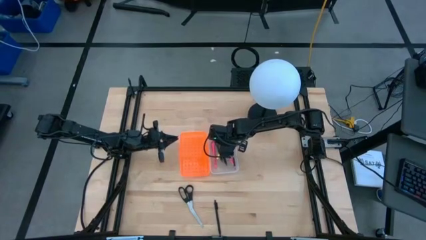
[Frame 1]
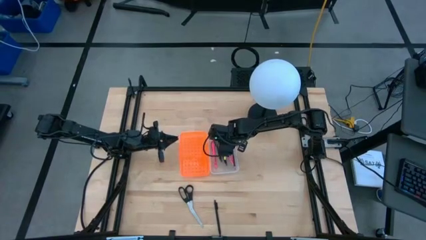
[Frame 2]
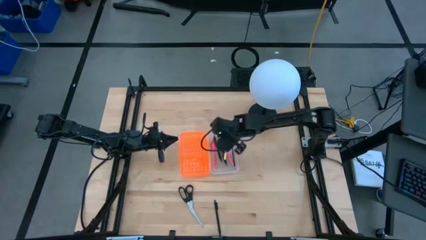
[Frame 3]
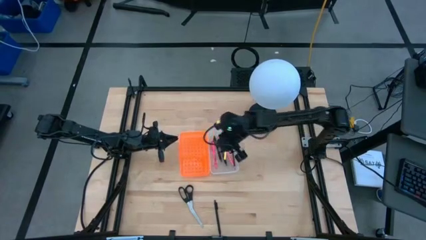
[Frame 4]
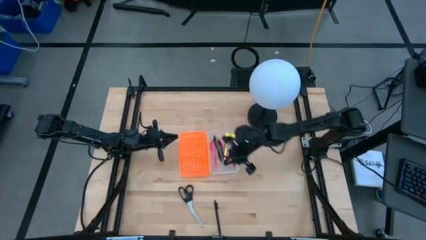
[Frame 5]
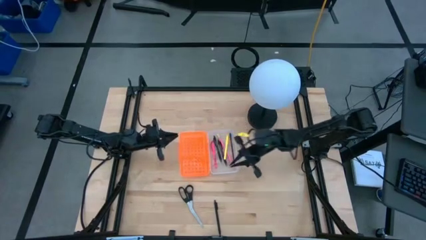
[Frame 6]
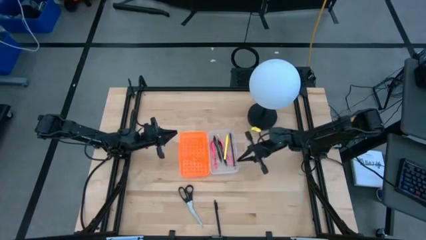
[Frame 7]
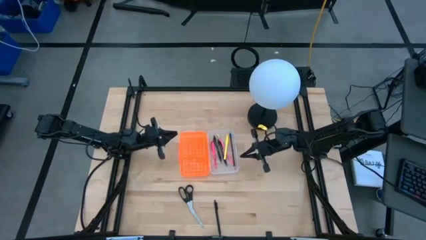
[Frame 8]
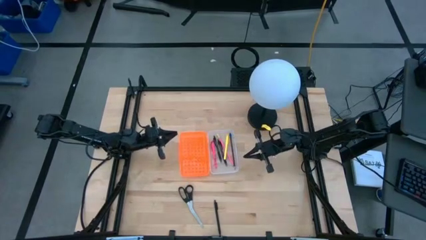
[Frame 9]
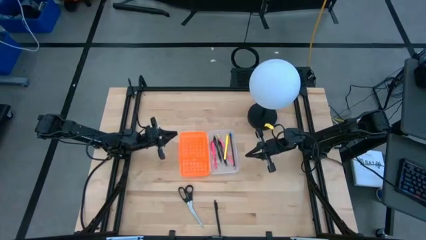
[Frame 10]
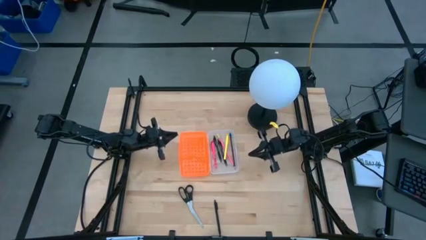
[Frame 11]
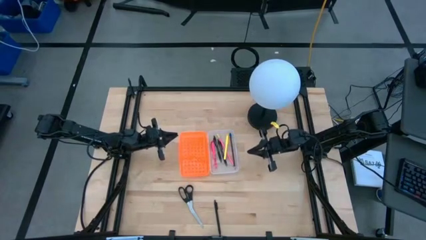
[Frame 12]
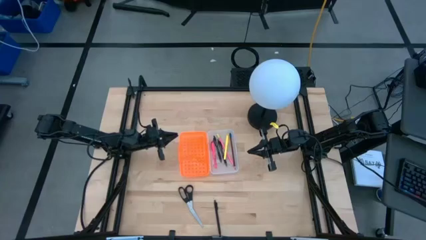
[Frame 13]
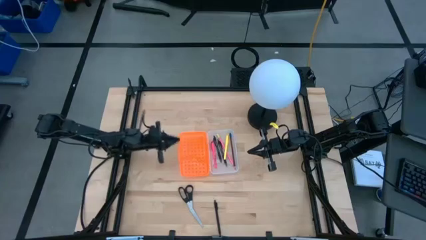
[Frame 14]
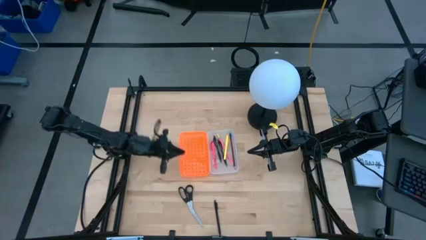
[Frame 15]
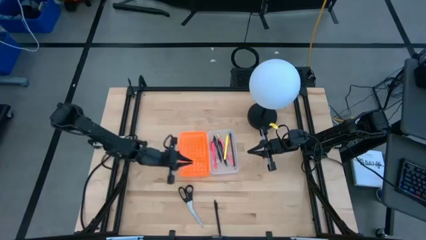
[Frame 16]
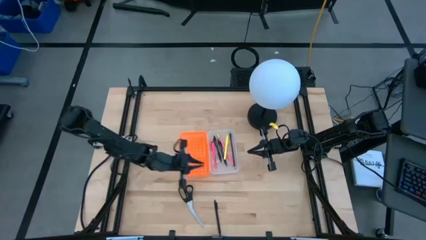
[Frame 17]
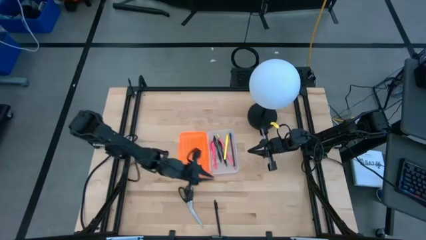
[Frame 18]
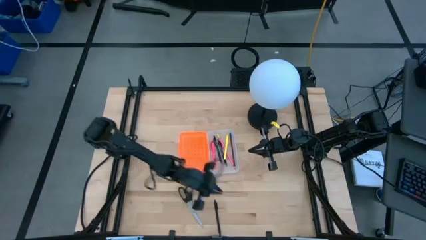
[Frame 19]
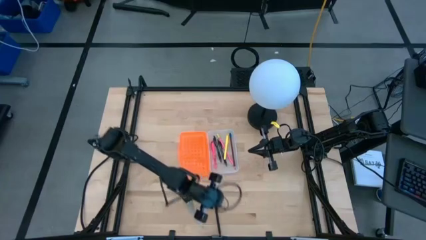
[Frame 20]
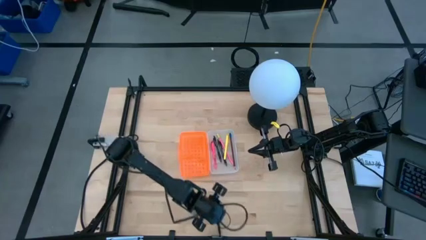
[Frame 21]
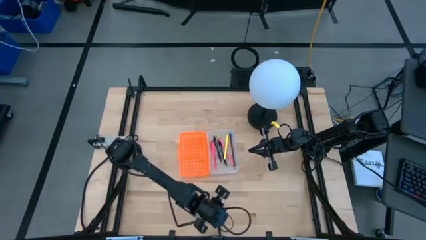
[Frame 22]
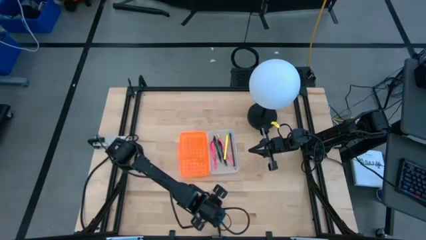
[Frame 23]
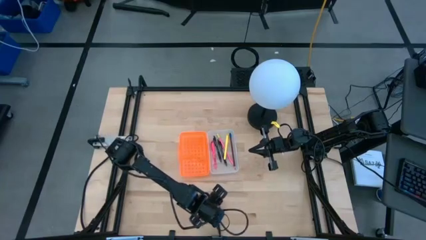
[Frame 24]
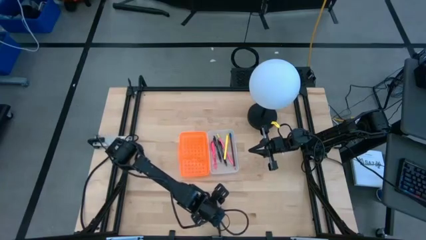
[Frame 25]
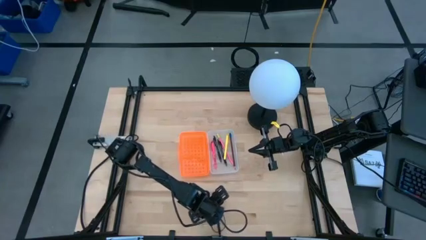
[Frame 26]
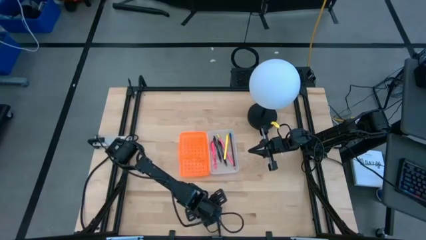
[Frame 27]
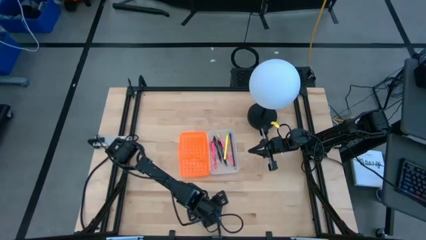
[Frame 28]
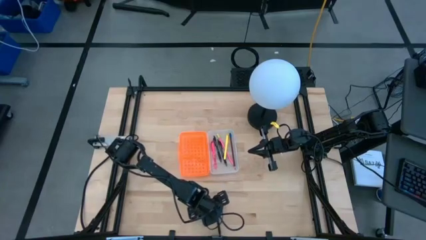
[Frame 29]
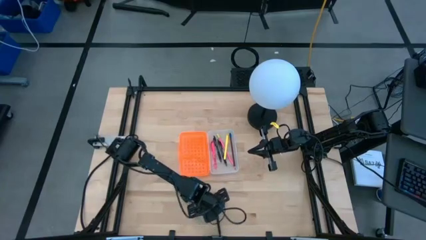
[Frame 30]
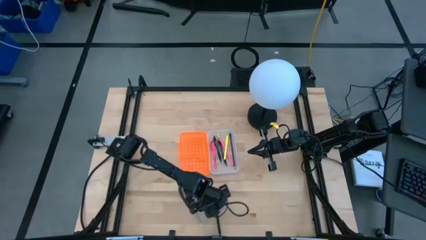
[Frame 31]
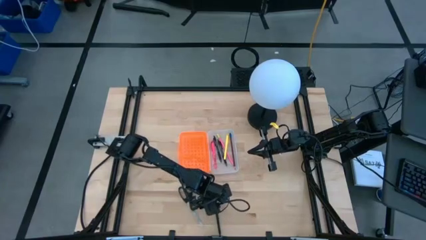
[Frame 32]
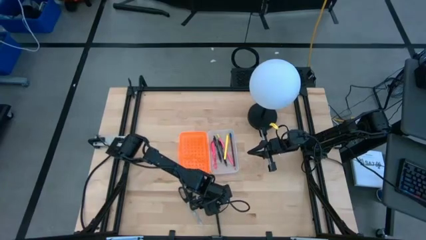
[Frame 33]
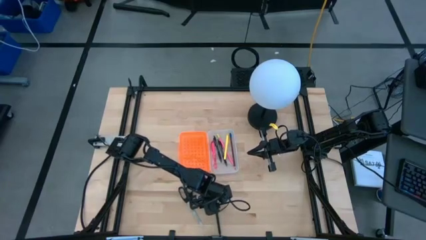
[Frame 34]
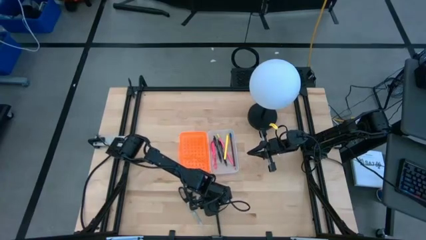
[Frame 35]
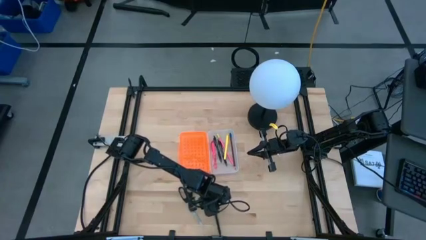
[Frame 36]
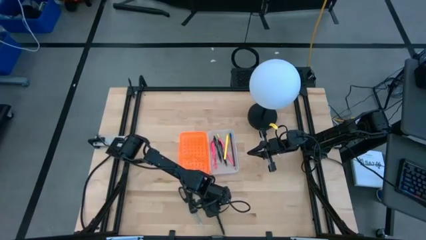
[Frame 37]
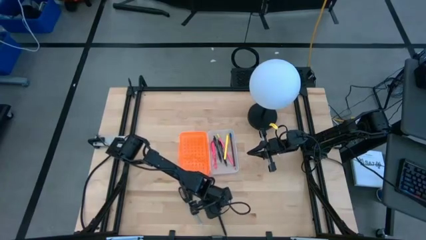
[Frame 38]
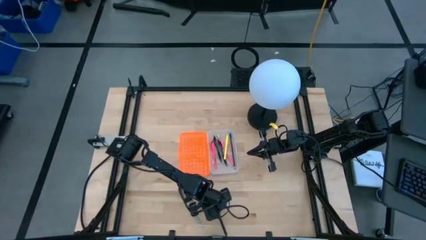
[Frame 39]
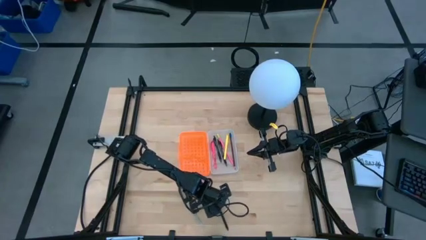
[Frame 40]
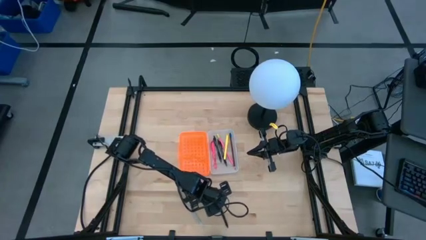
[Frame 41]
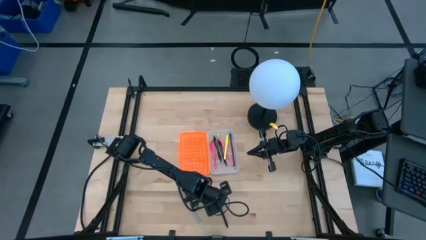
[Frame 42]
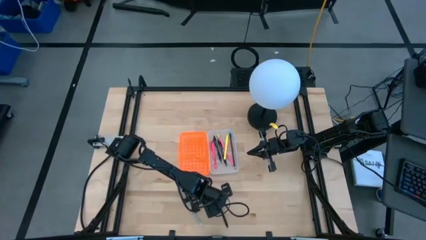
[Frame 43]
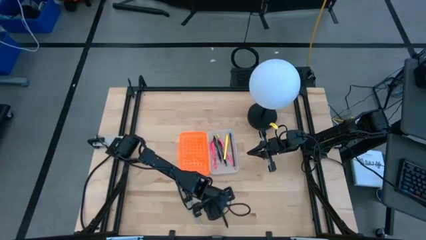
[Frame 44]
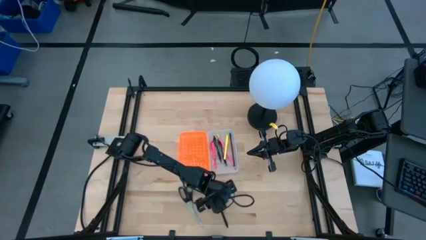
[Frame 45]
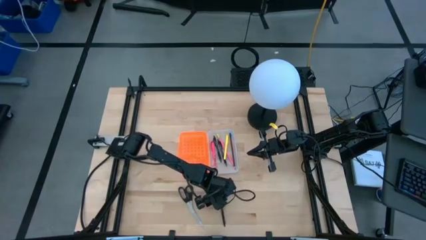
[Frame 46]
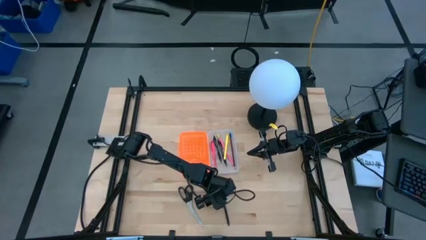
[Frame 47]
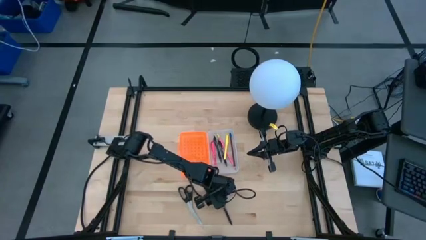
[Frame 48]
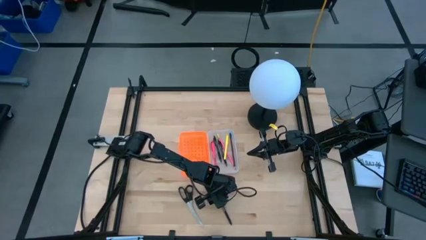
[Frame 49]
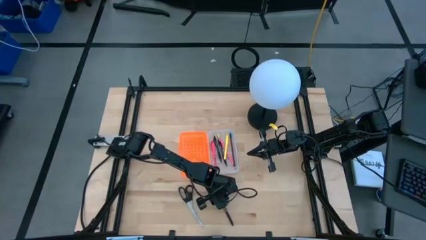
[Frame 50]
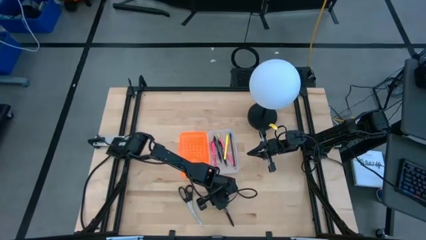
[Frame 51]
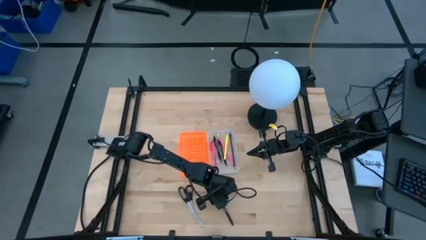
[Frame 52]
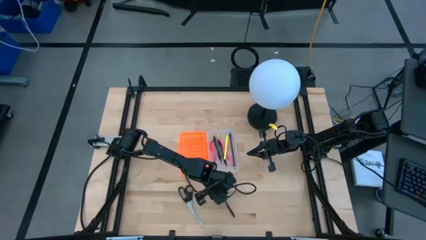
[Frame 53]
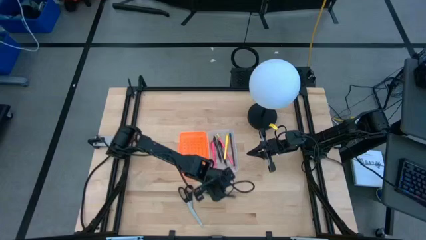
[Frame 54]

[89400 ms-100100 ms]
Task: Pick & place school supplies into a supply box
Put the black pen into the supply box

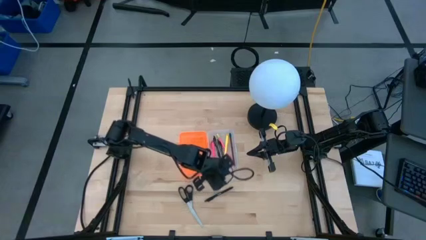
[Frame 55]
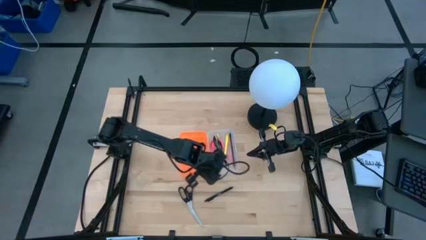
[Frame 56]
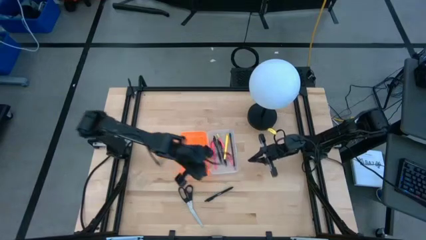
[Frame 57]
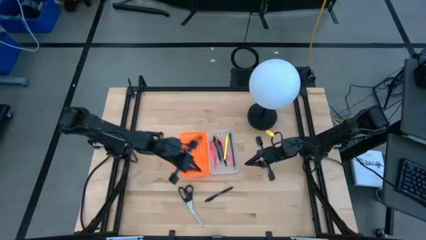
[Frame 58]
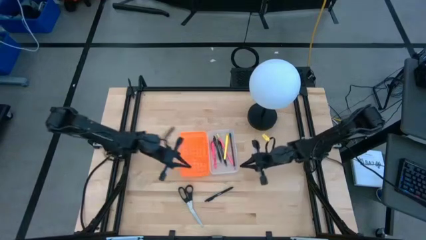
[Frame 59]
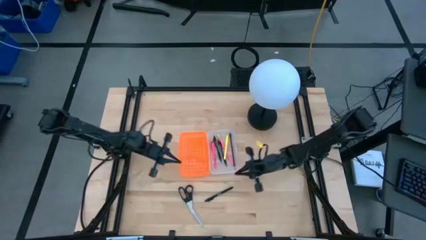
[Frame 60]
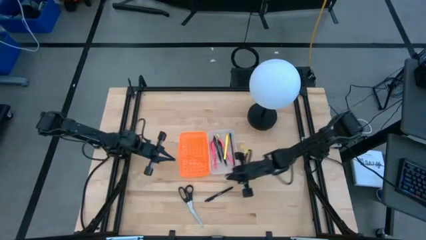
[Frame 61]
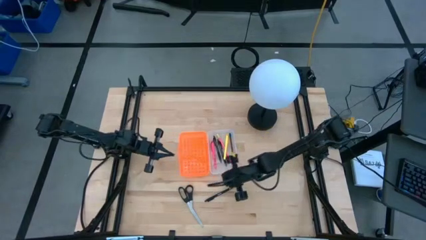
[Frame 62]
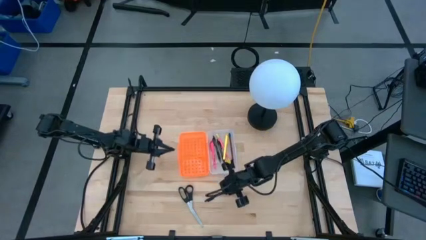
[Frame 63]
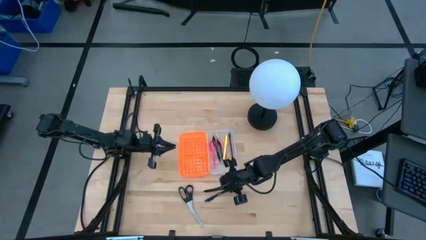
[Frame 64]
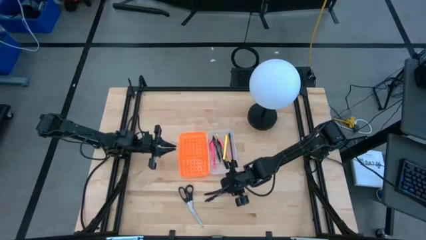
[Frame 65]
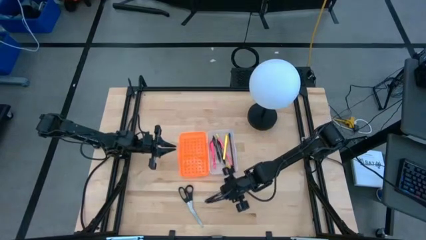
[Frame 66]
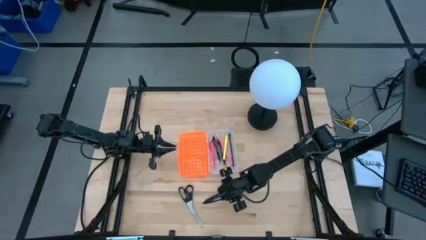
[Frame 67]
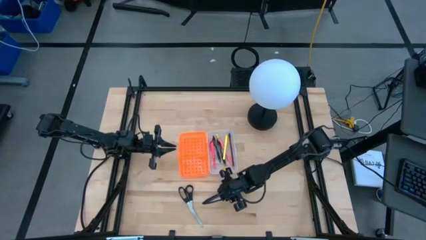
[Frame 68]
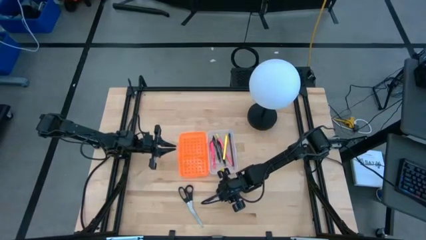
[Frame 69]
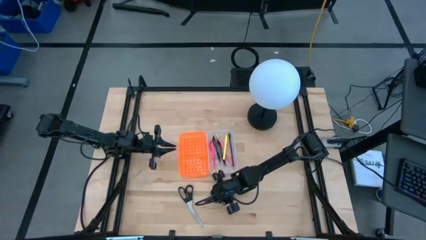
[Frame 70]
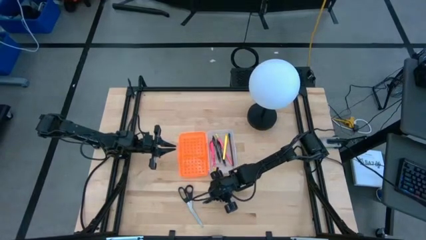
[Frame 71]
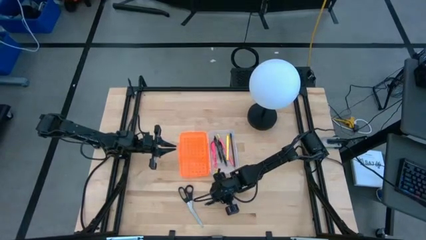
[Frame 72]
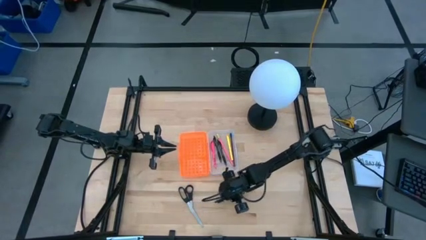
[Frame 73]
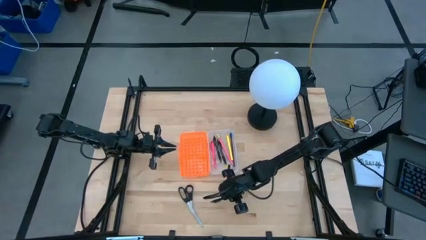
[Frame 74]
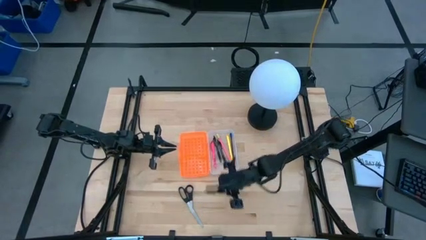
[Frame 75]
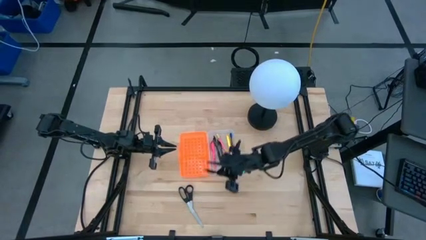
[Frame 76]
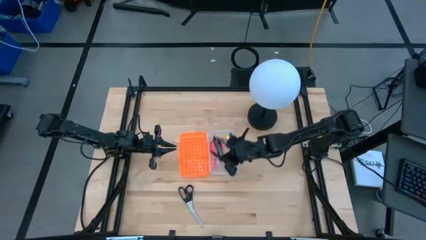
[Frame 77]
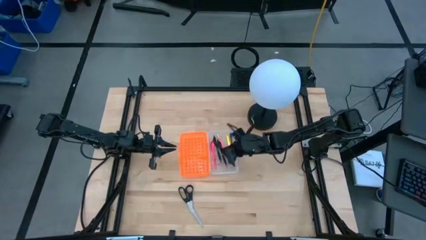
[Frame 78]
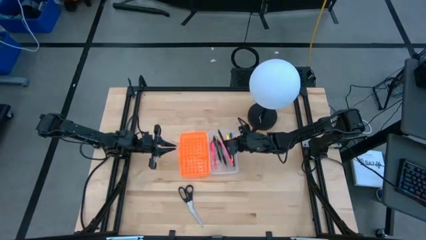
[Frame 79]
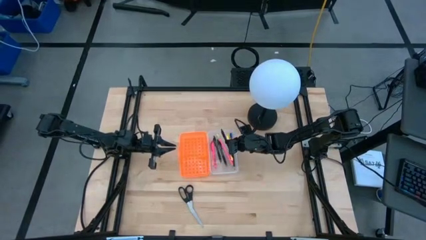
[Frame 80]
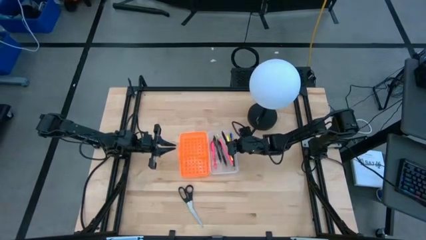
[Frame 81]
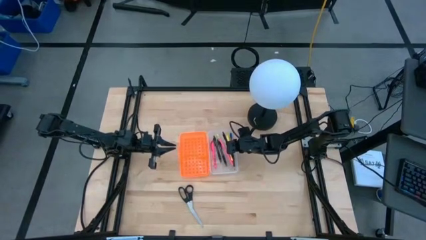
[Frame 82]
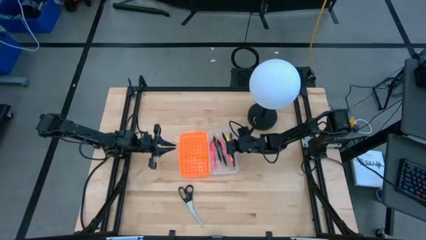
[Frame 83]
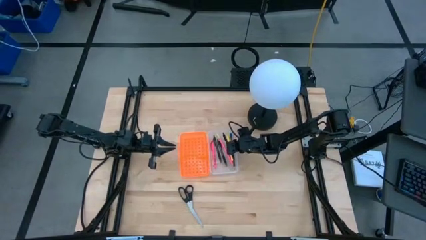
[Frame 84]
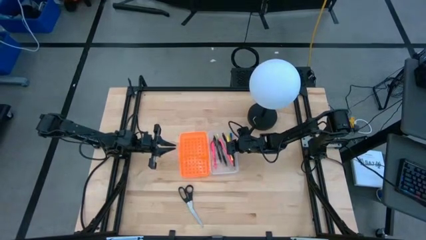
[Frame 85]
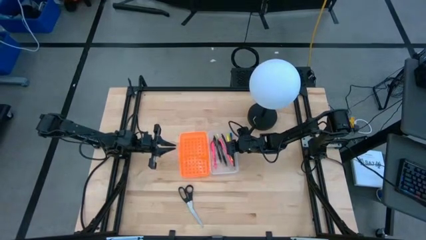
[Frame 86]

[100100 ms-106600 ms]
Put the black pen into the supply box
